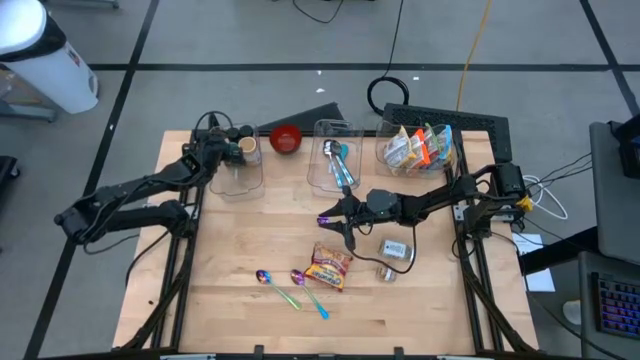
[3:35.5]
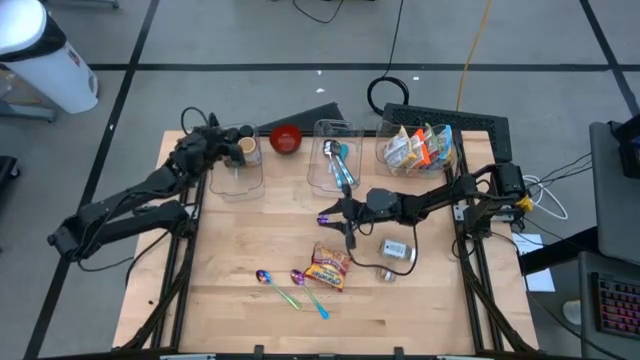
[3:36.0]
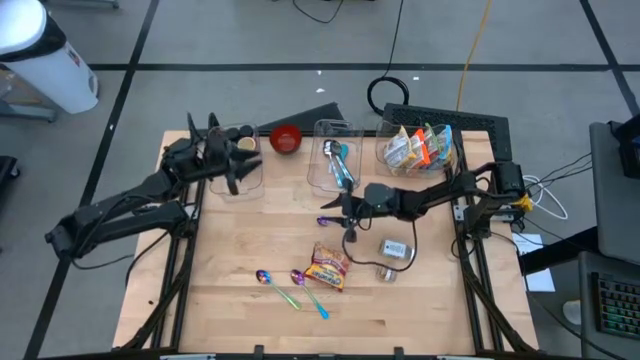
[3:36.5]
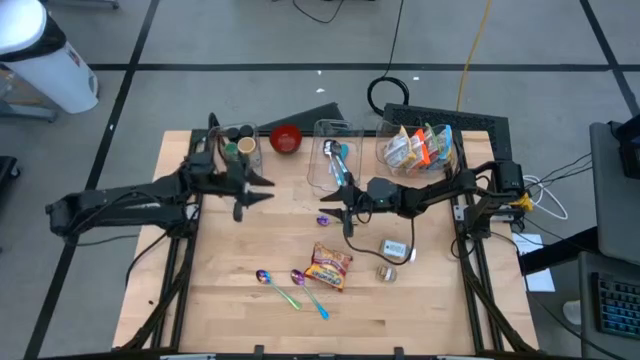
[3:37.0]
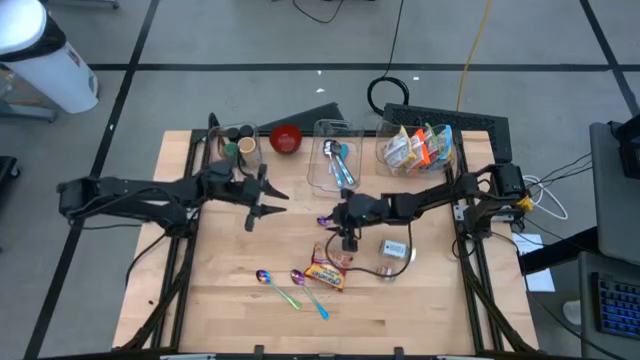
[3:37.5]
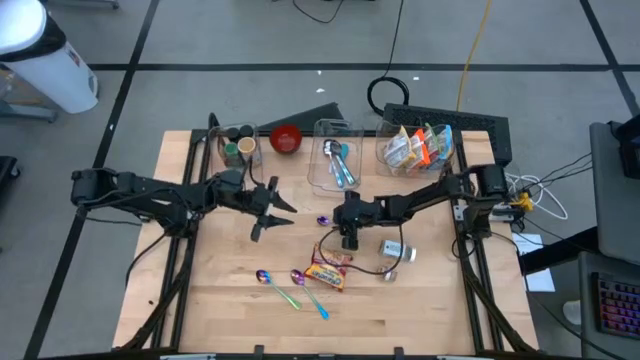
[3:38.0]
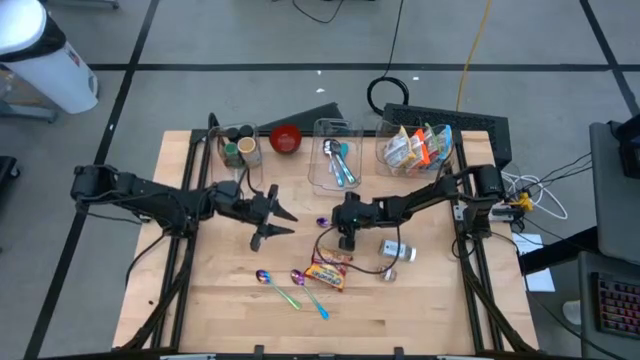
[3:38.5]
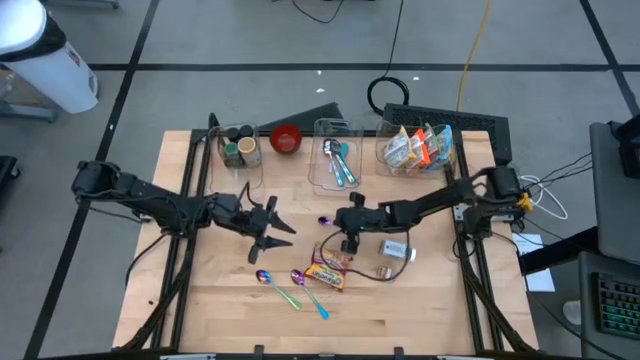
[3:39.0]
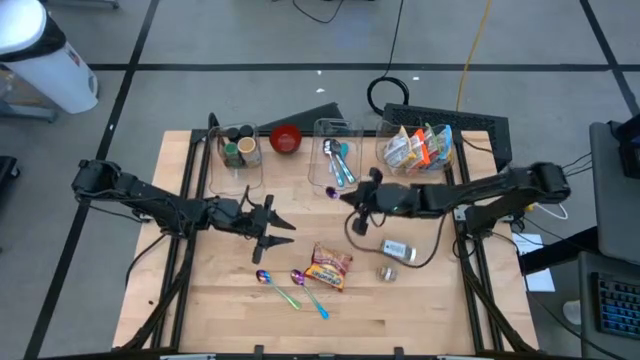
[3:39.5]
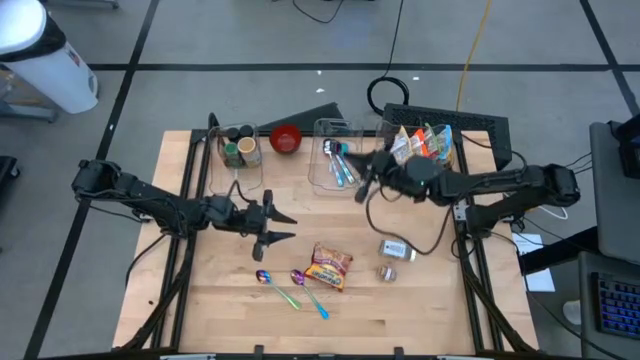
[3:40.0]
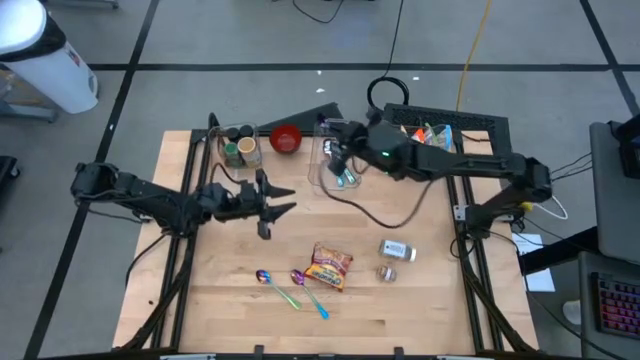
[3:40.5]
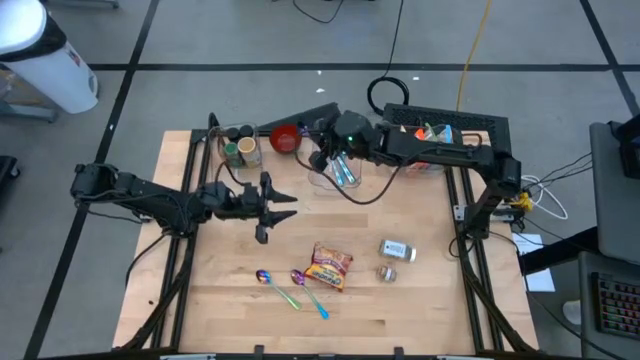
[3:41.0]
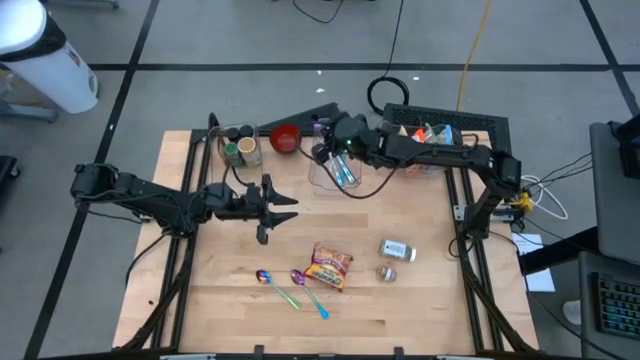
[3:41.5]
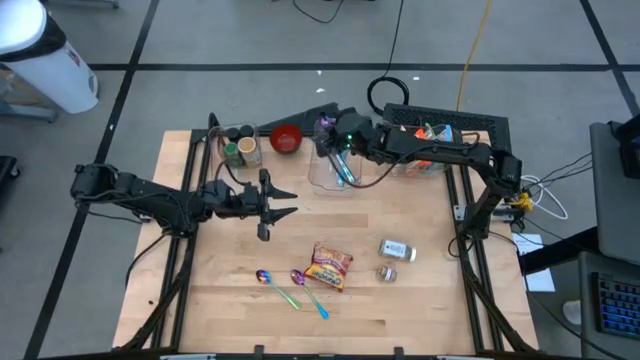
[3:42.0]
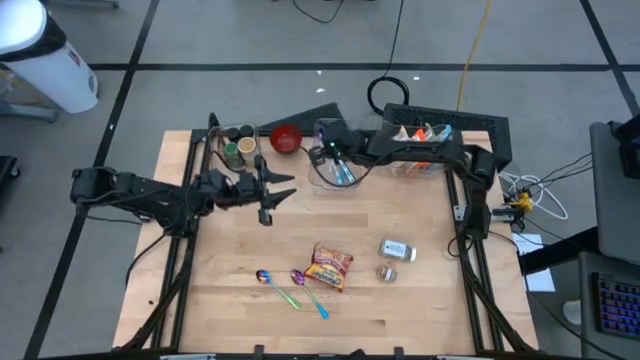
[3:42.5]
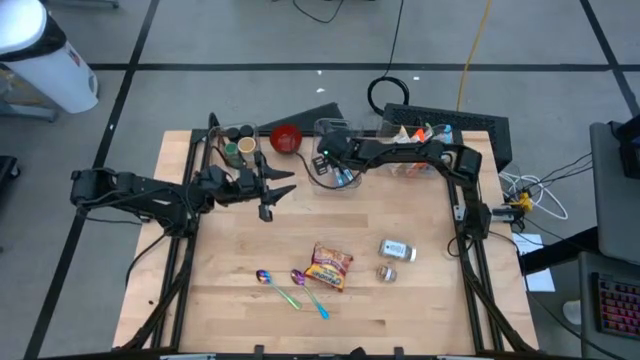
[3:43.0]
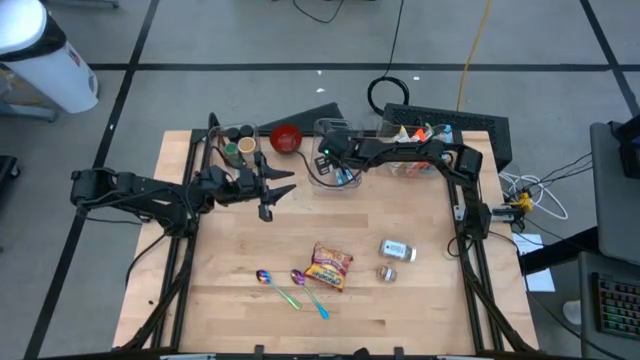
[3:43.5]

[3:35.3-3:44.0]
Task: Pick & Place Food Item
Put the top violet spoon into the middle transparent bin

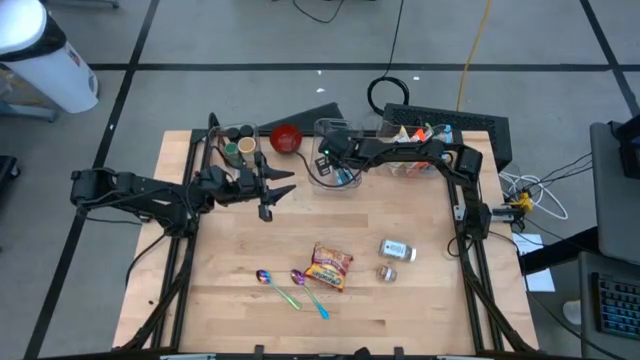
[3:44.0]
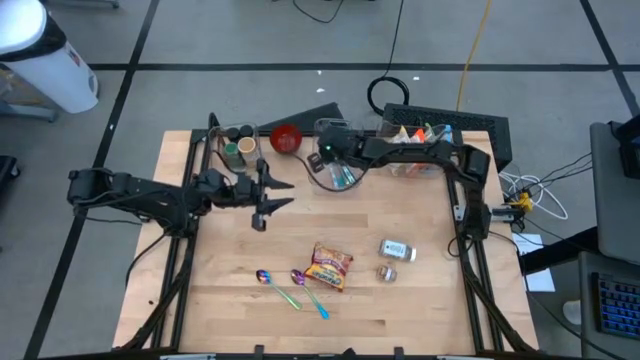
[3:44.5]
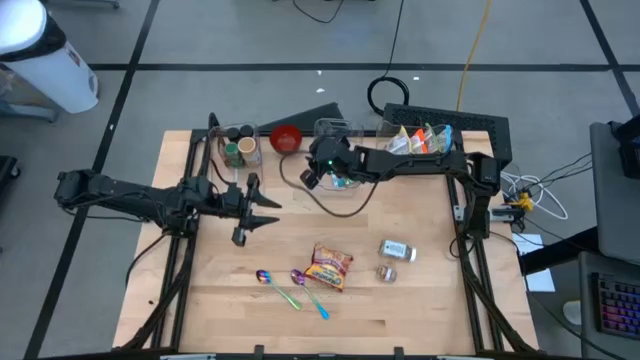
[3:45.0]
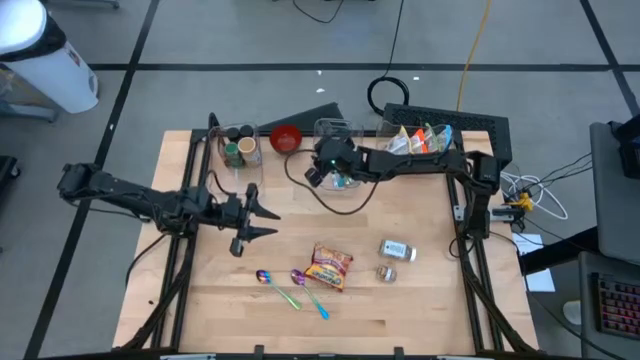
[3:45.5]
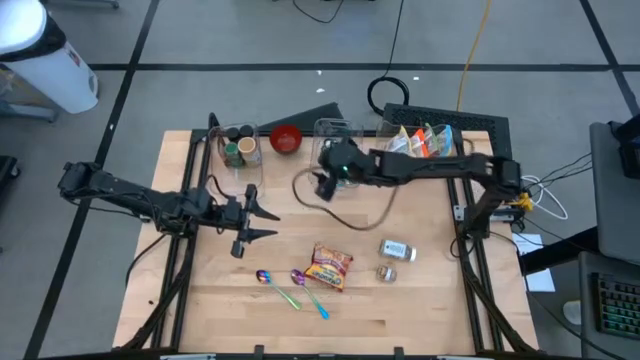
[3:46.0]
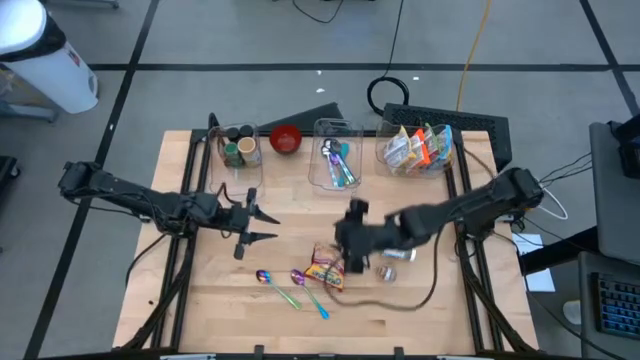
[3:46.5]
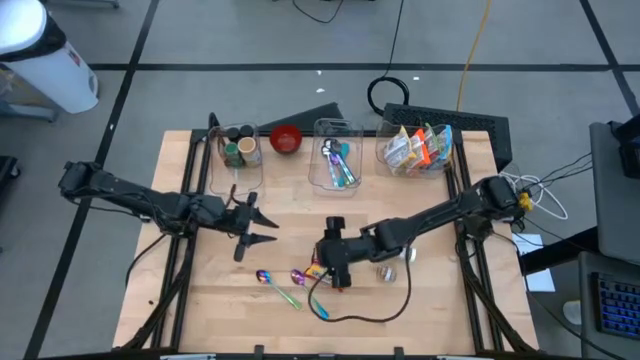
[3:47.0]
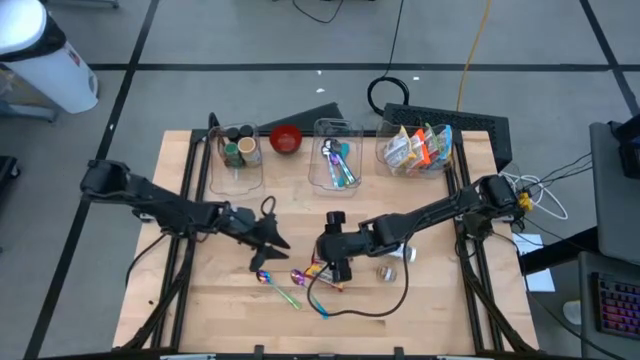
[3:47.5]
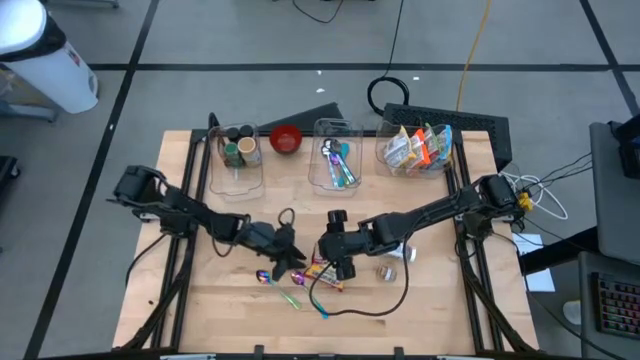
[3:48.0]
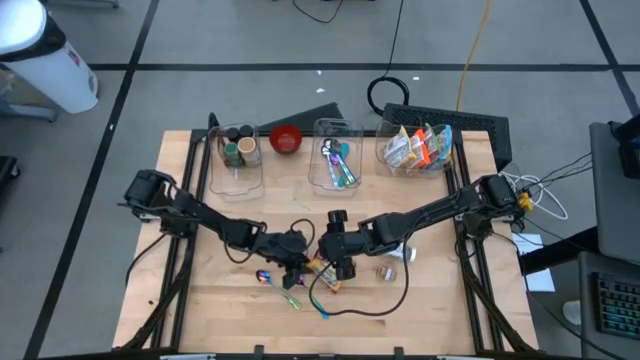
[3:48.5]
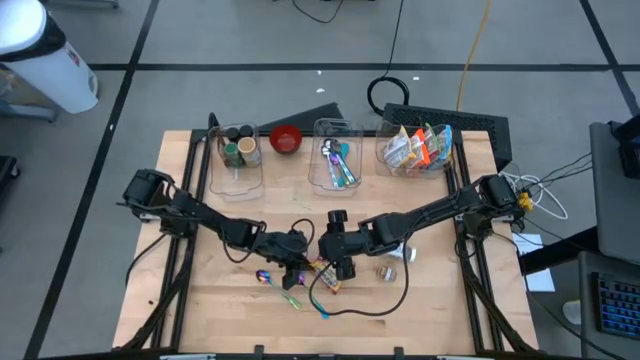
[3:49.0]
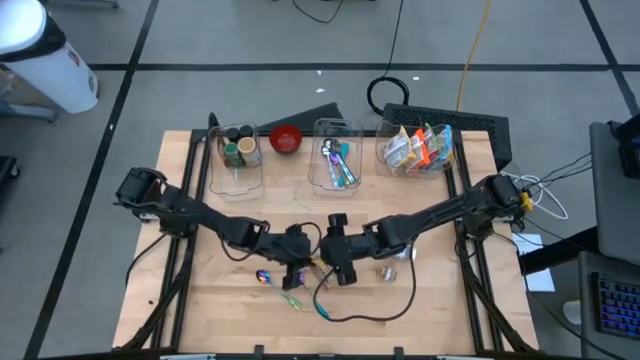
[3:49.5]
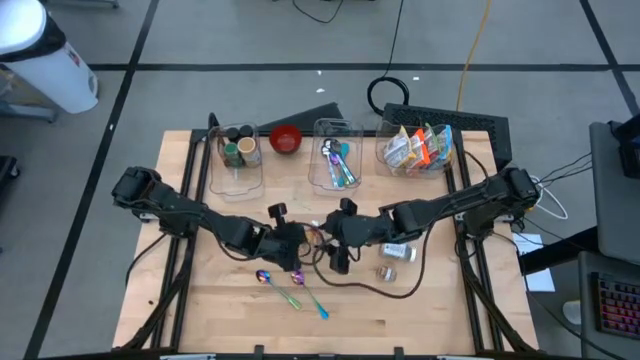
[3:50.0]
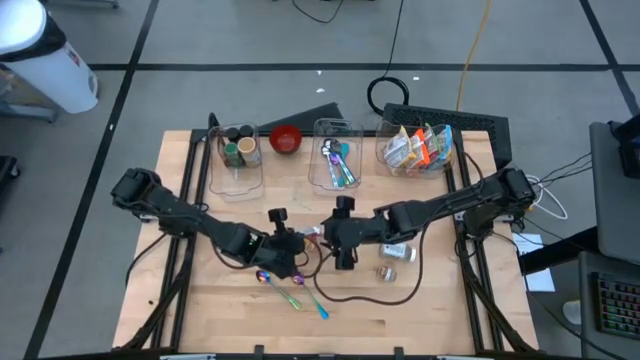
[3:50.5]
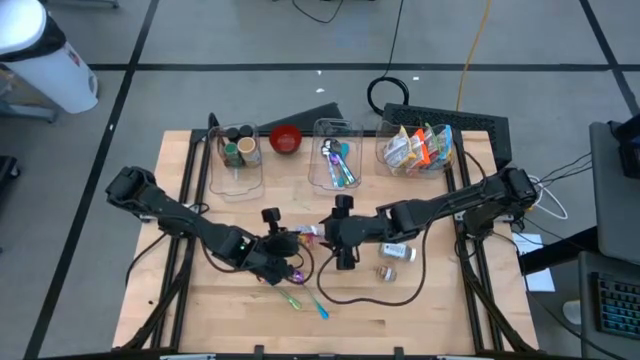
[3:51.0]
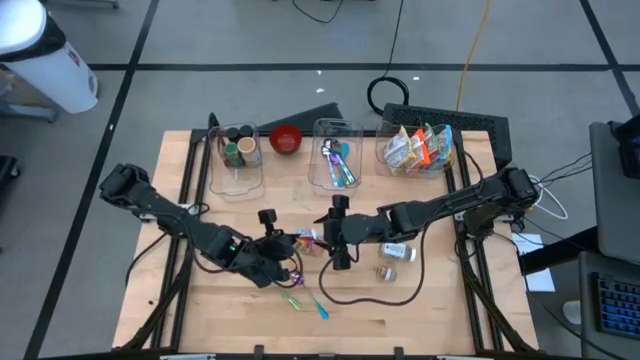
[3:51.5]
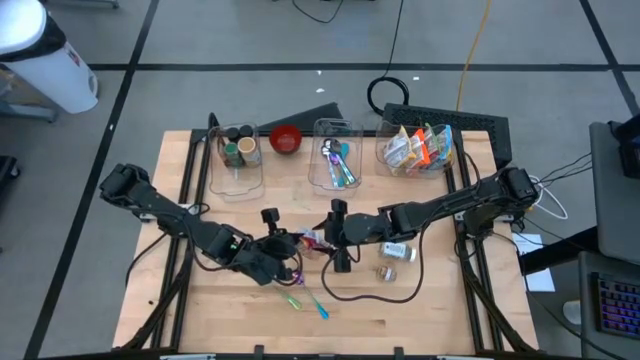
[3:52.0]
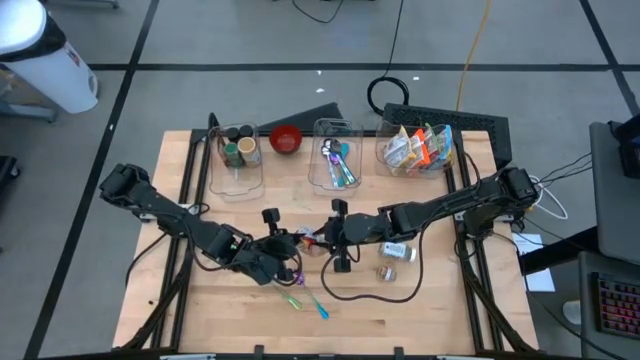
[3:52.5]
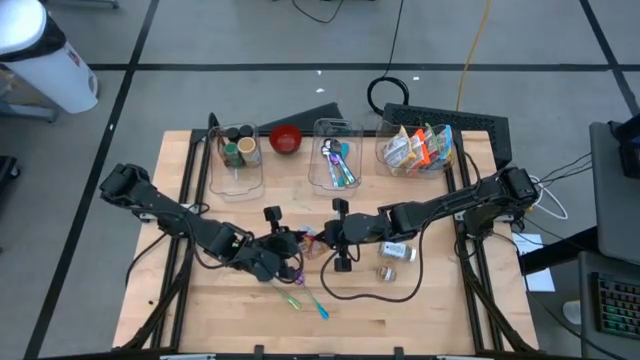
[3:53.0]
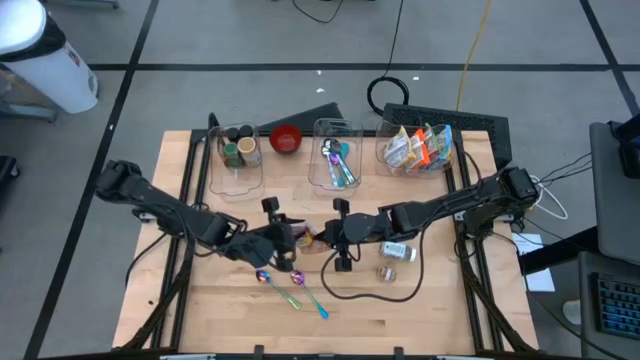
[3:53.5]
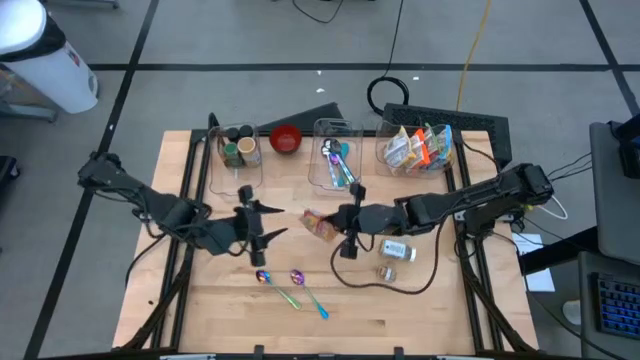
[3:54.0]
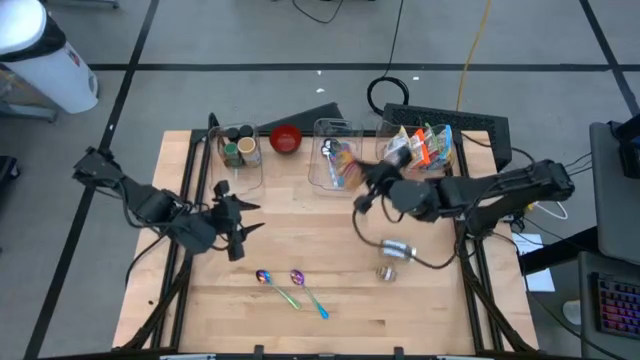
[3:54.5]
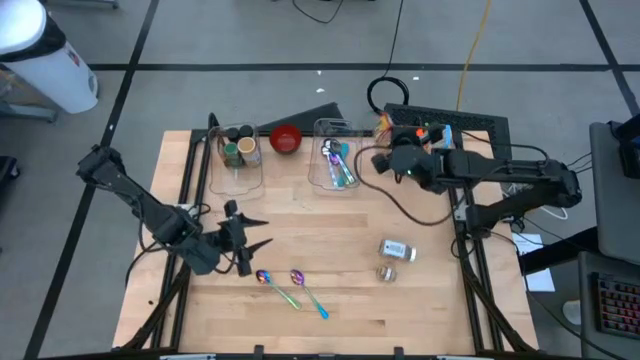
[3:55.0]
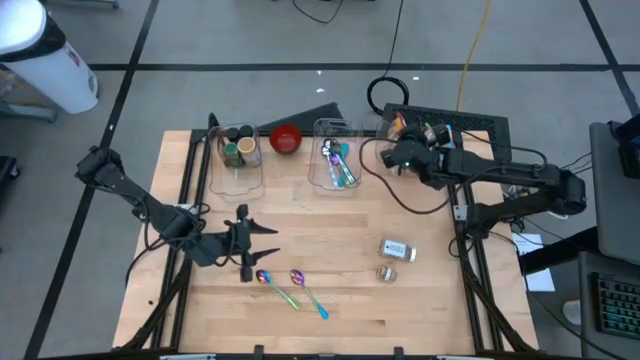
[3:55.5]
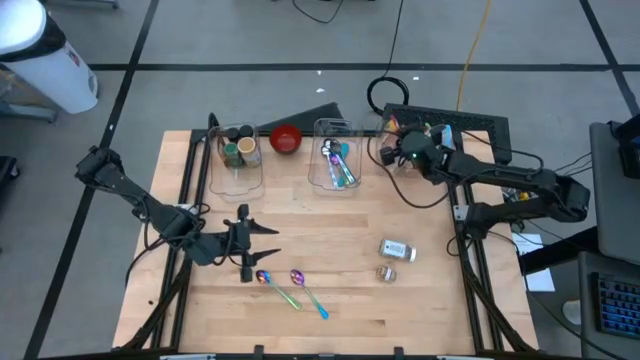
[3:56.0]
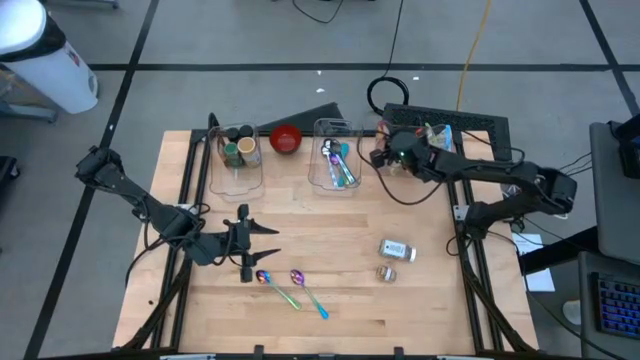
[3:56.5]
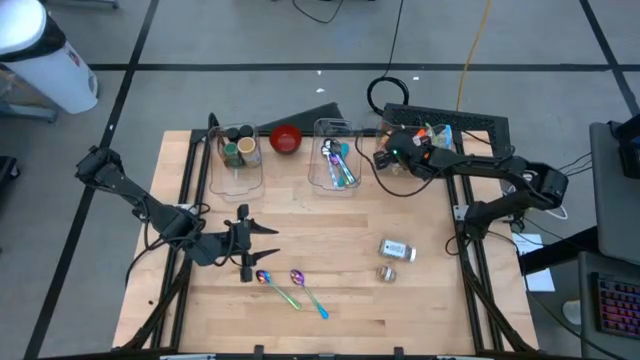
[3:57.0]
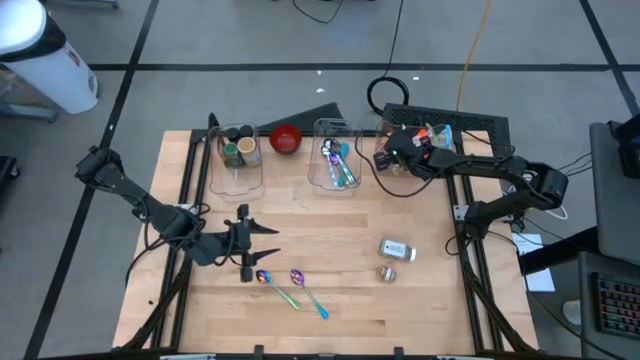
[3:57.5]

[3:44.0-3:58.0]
Put the red noodle pack into the right transparent bin
